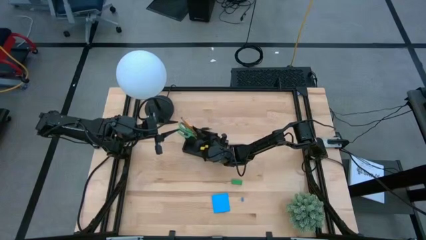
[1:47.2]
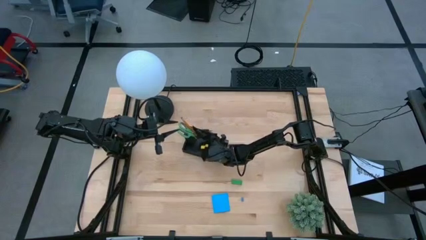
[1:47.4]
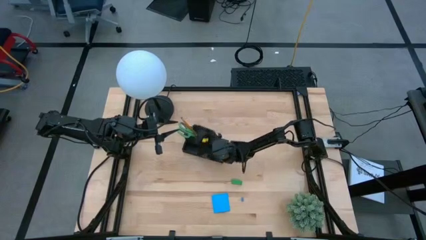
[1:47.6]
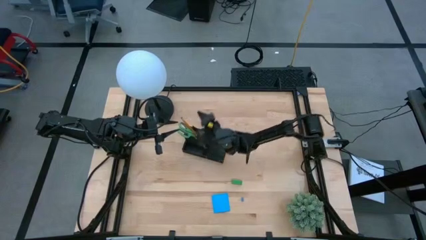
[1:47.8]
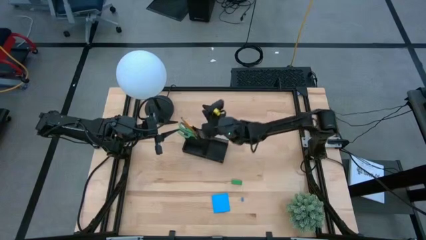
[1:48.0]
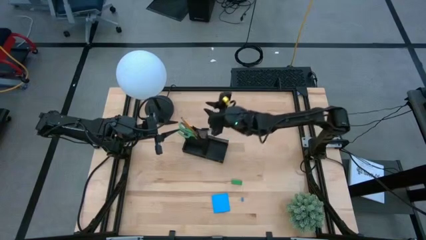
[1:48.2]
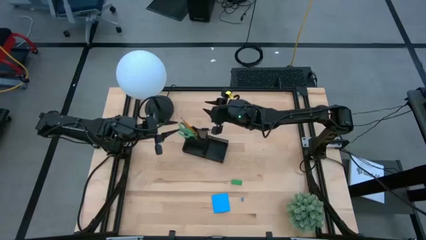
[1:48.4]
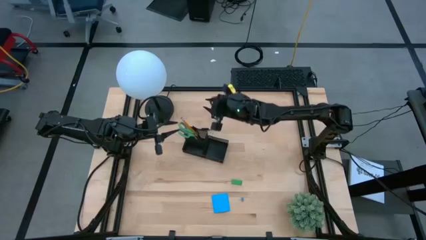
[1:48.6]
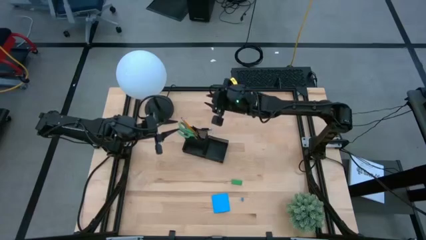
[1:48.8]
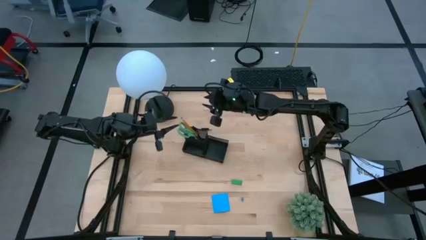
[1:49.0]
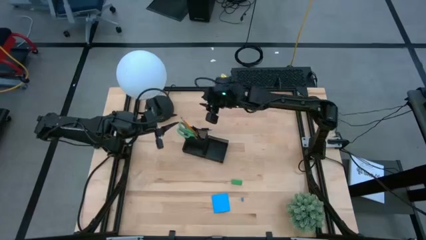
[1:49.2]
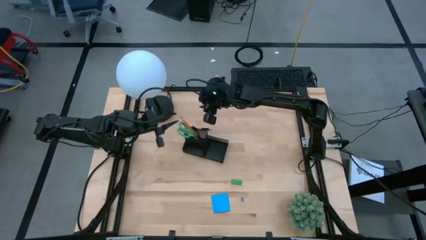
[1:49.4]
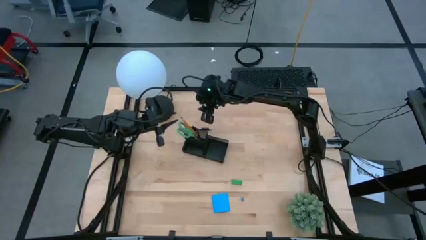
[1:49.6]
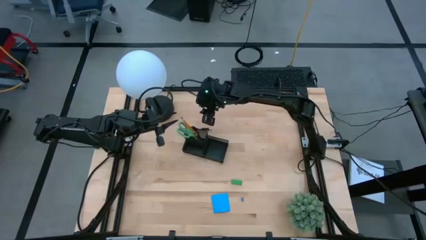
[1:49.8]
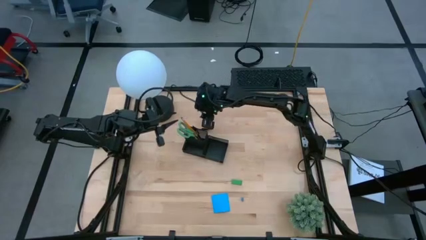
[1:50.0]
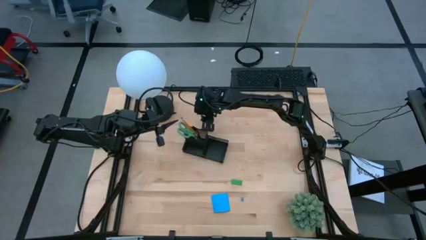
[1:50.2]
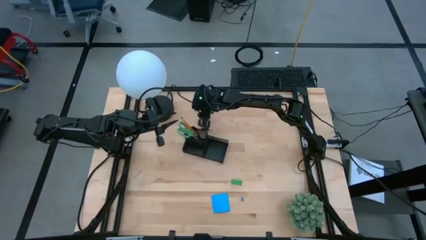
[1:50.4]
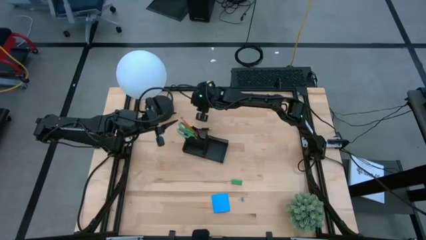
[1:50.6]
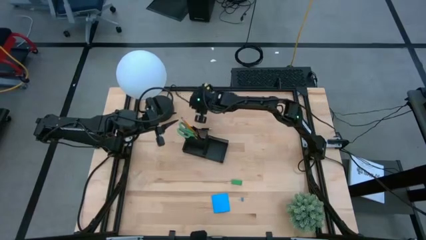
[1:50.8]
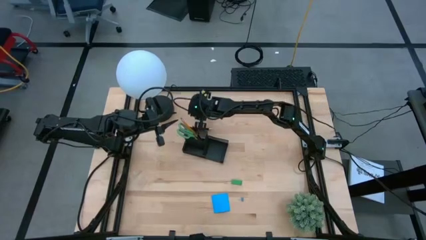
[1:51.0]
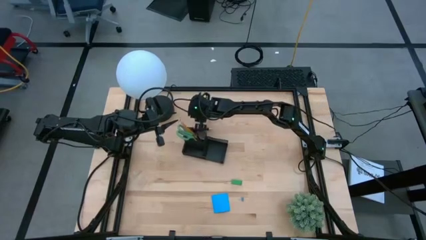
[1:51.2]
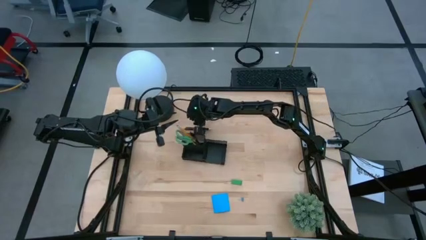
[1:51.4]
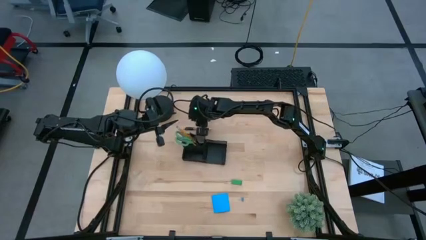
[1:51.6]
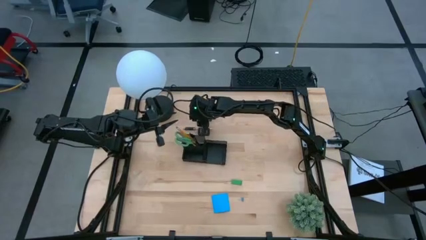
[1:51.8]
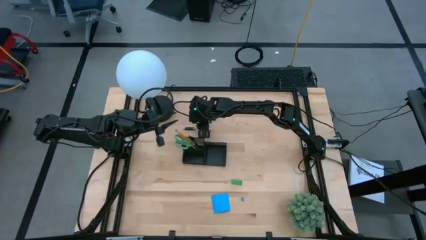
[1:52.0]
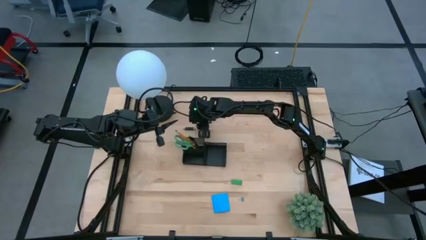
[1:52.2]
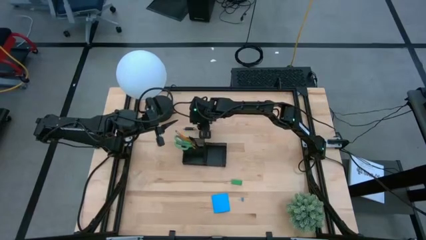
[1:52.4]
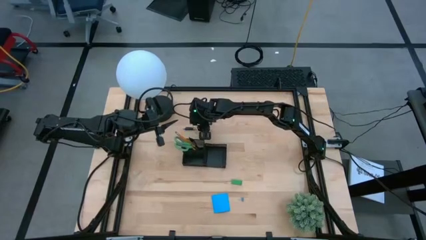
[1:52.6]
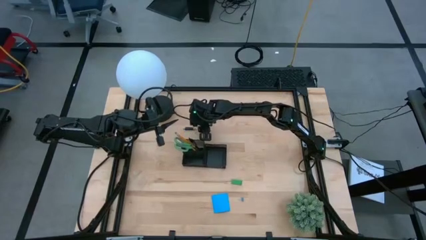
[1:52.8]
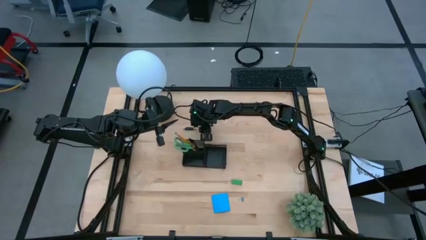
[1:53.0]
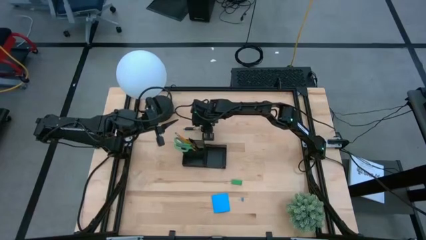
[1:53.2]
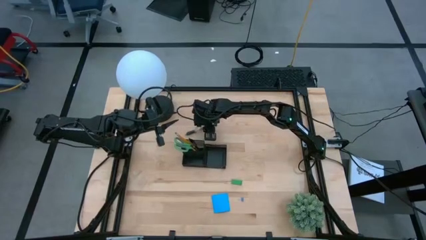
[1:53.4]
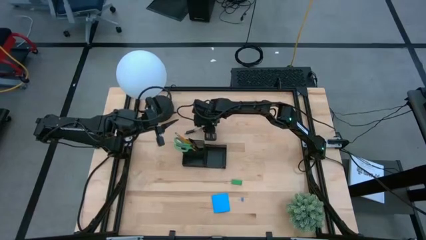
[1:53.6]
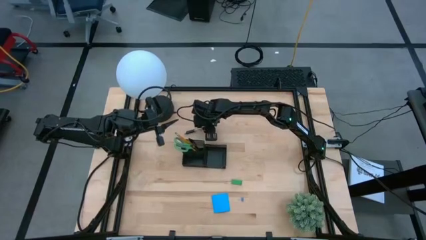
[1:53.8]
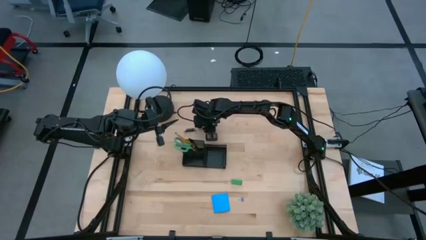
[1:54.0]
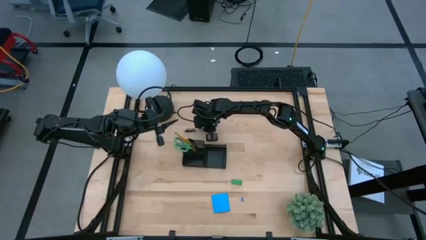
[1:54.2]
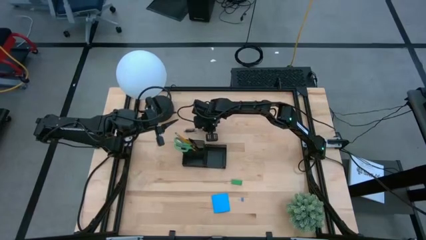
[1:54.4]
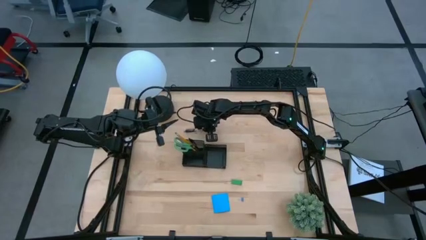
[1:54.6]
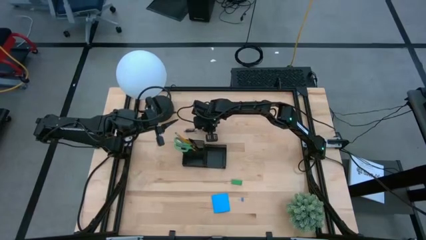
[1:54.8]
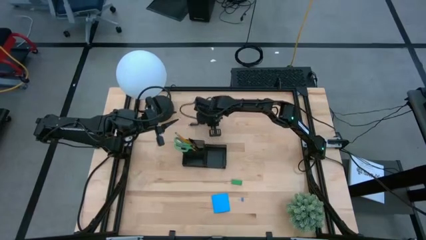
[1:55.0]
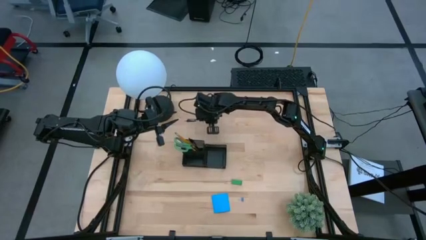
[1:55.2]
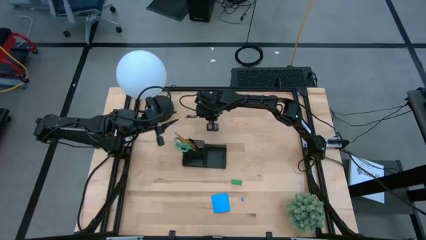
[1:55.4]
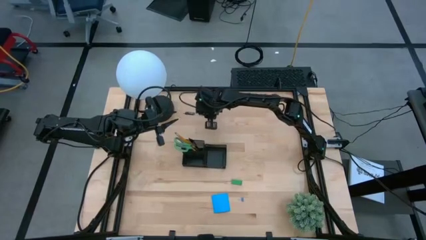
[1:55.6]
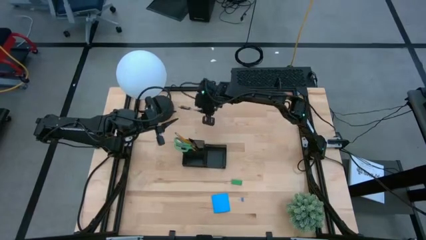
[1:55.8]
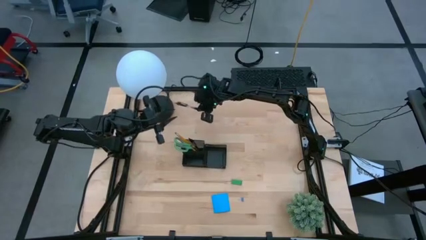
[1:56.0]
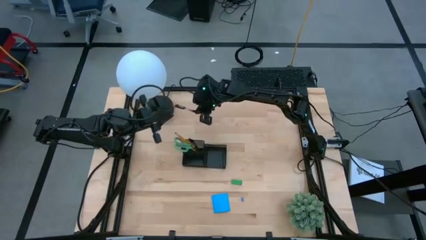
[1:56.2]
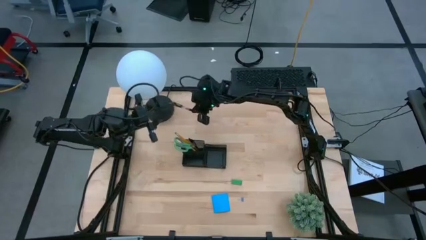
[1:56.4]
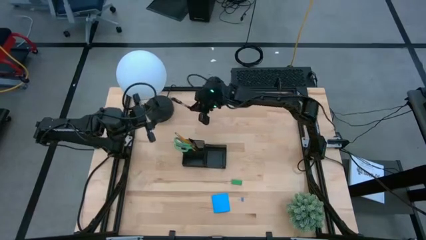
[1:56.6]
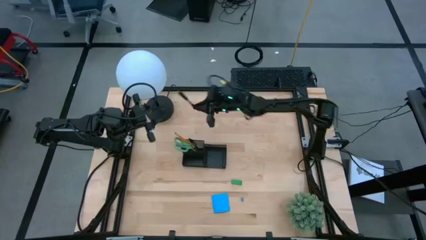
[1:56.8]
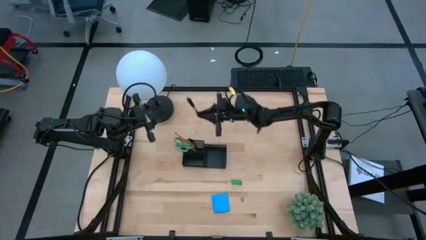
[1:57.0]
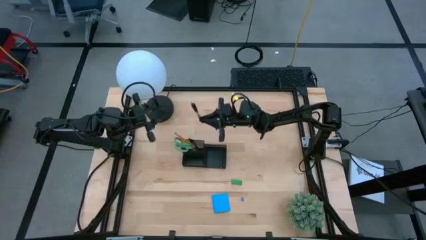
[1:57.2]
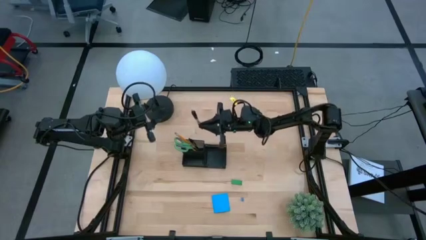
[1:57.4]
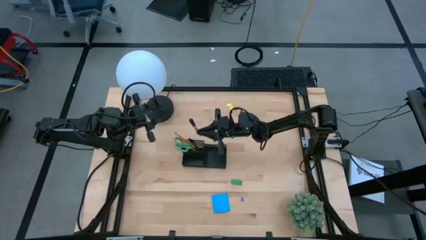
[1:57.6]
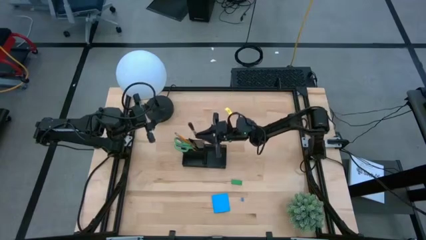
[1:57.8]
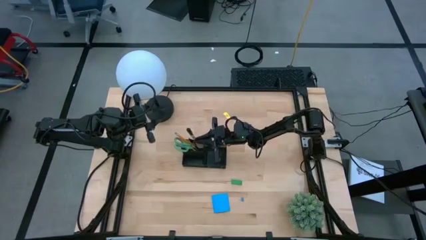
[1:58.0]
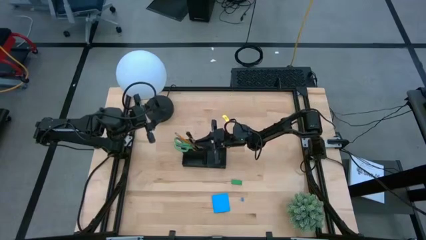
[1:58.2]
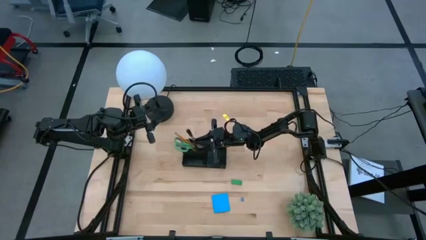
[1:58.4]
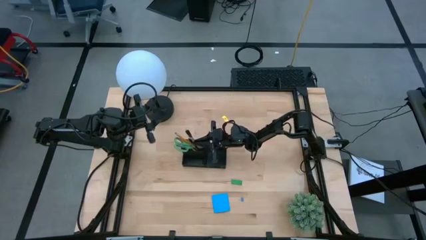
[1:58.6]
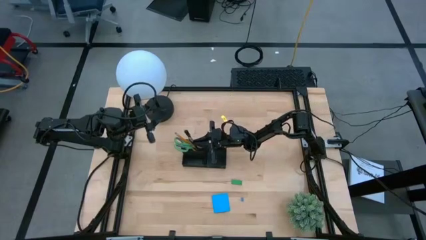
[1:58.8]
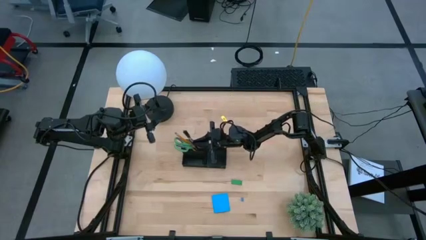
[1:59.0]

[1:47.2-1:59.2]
Task: Pick and place office supplies into organizer
Put the black pen in the black desk organizer
